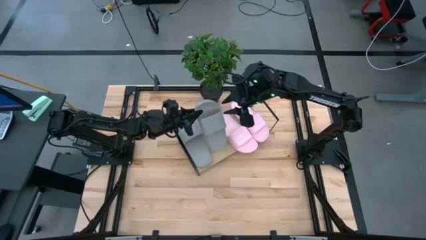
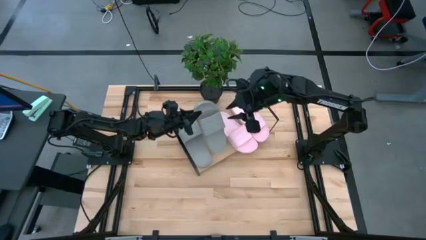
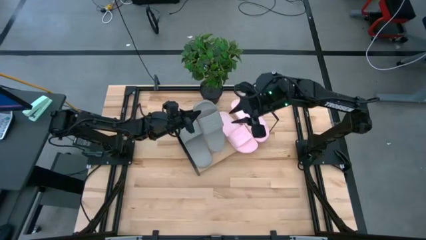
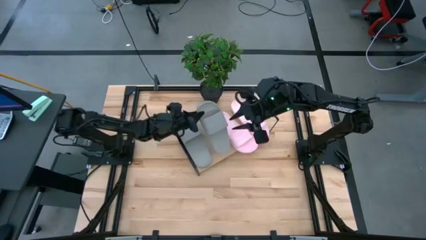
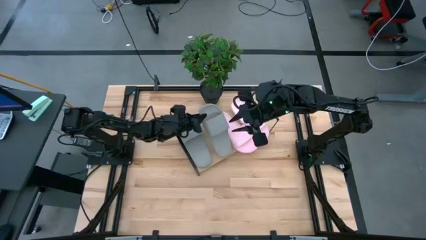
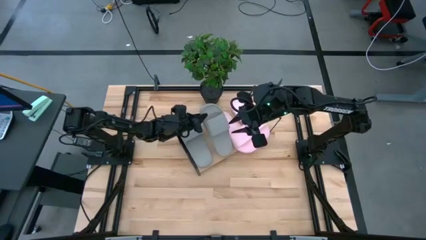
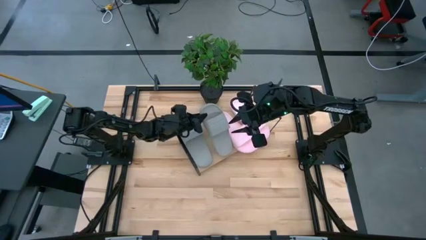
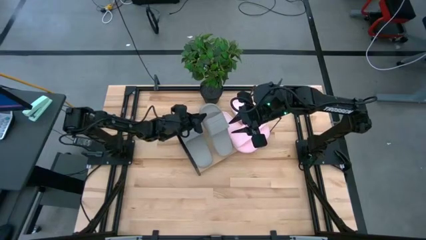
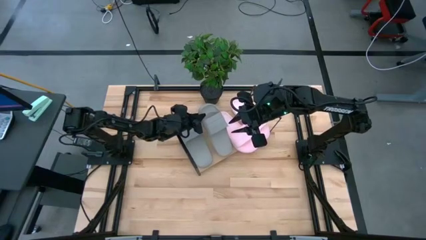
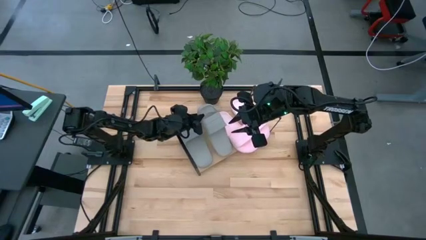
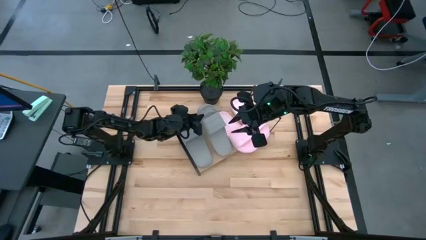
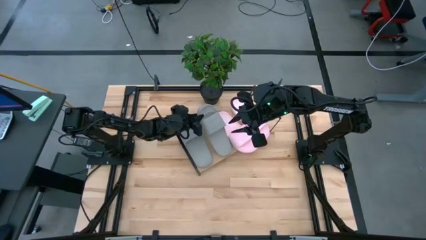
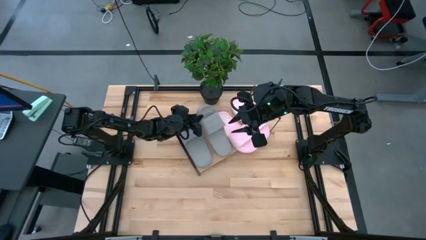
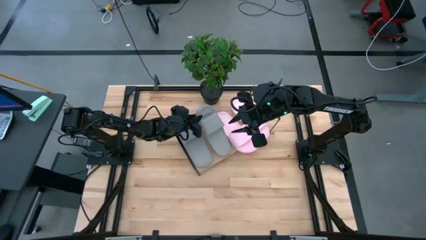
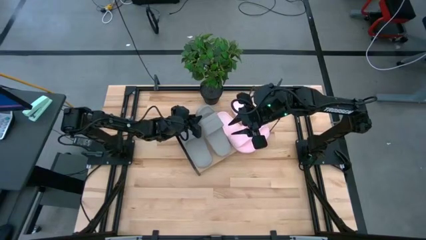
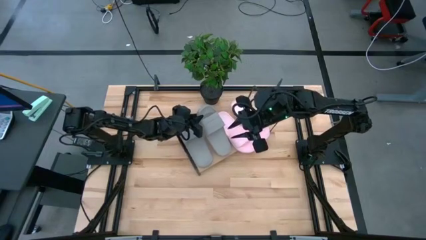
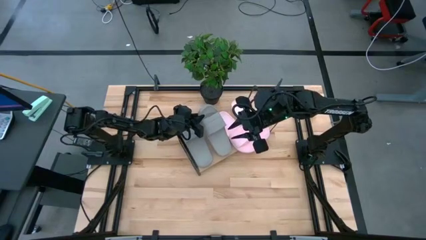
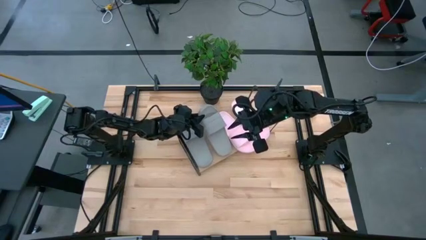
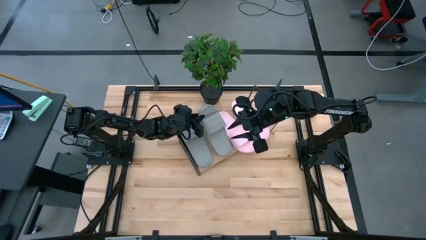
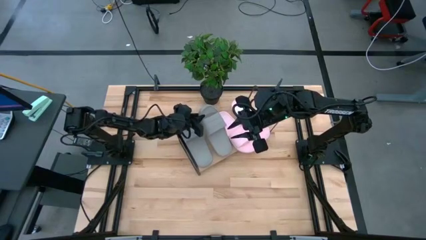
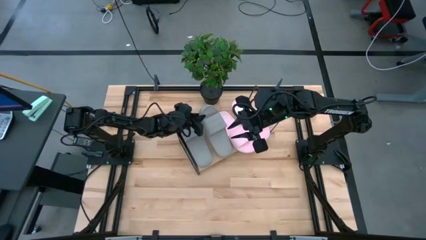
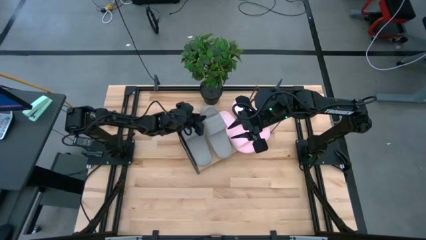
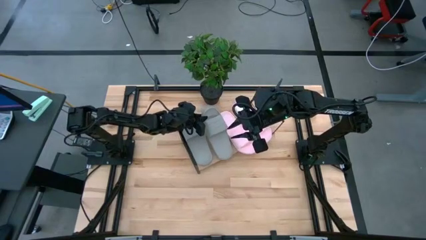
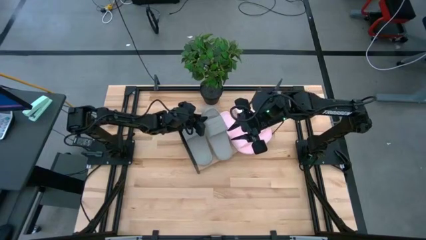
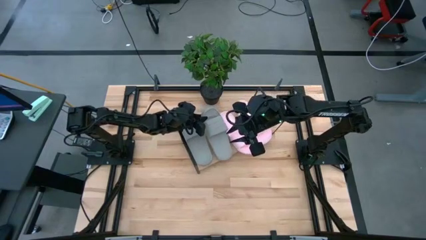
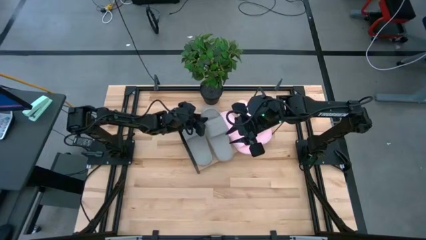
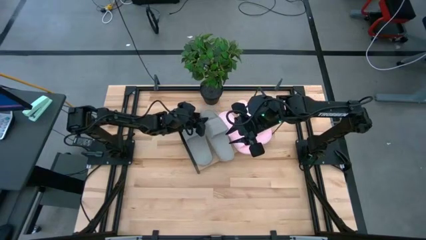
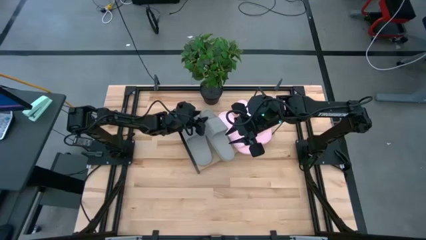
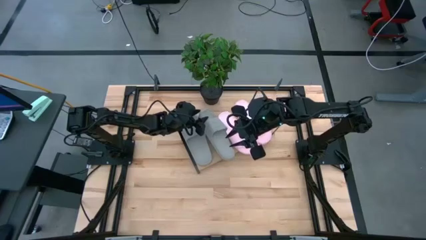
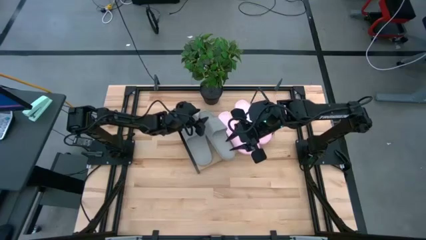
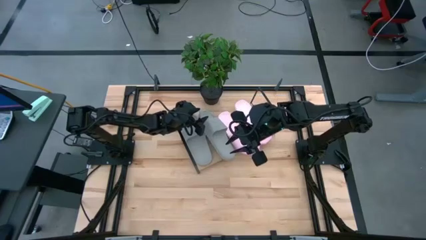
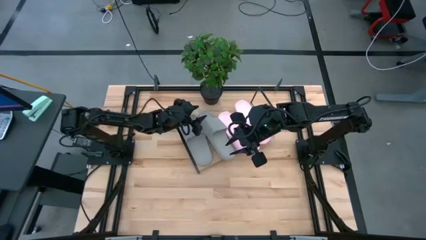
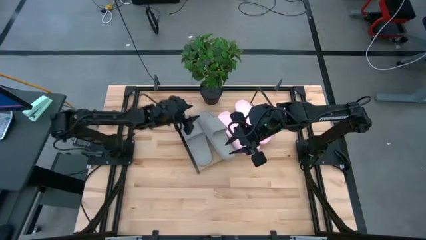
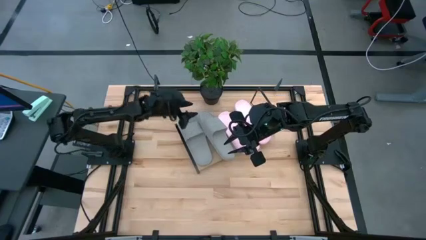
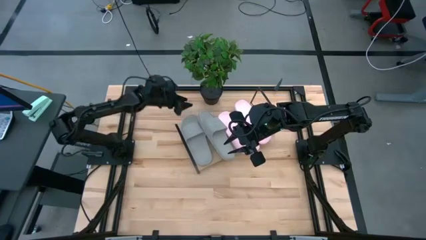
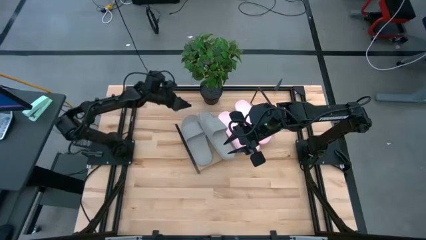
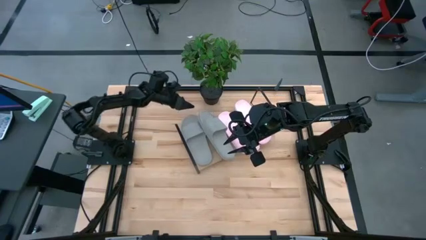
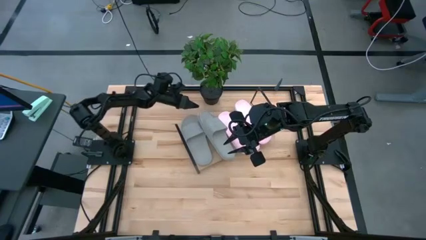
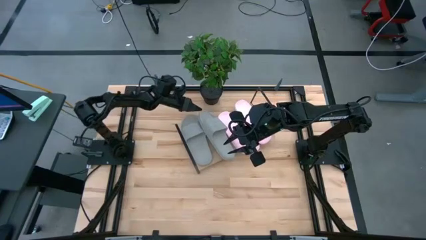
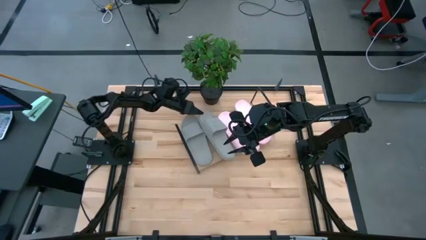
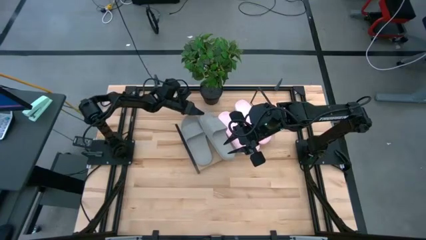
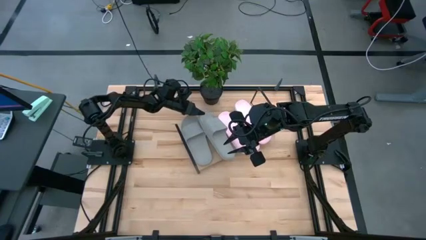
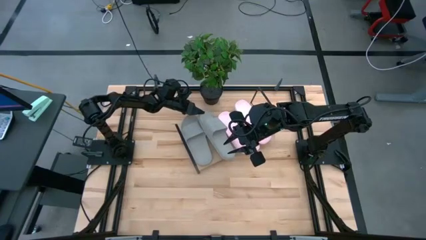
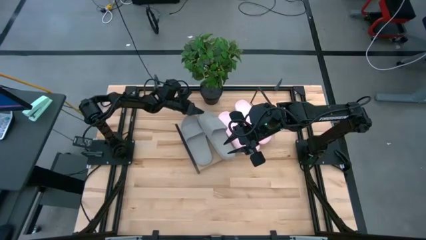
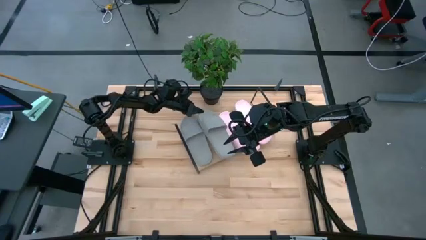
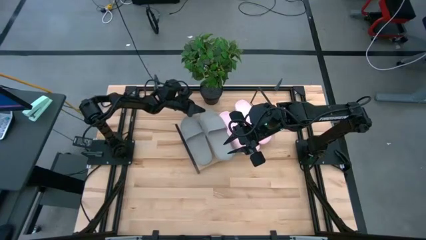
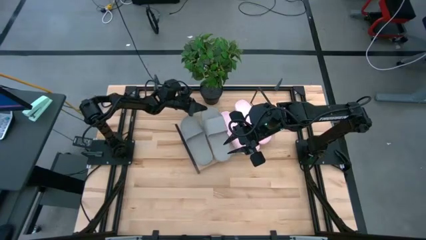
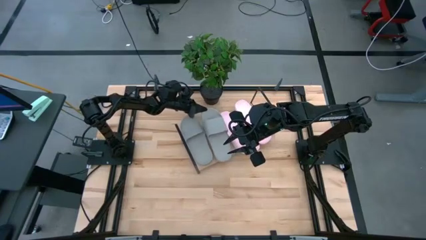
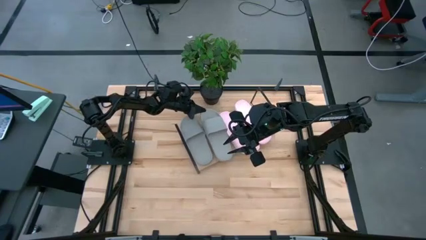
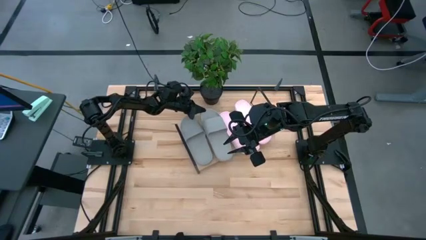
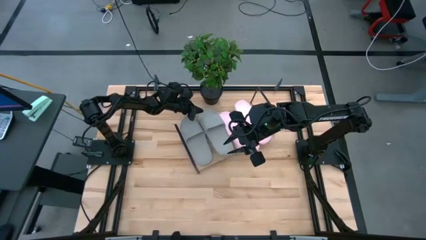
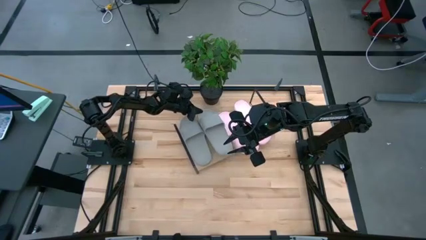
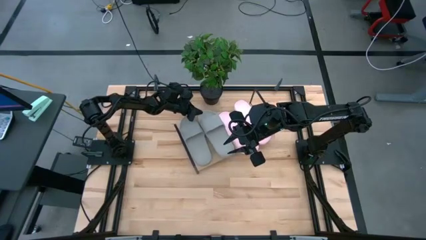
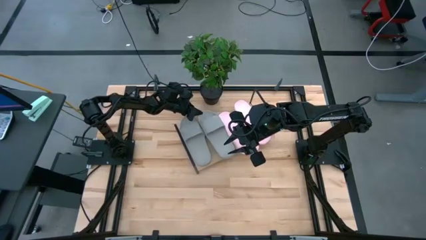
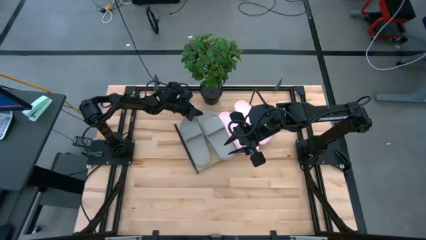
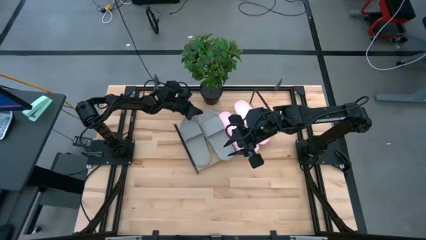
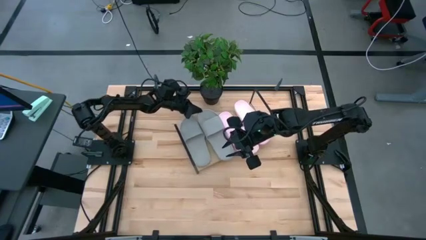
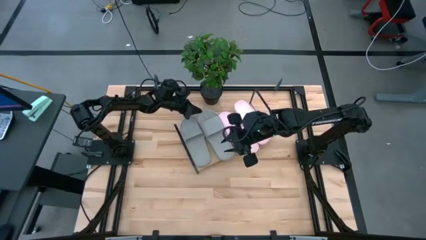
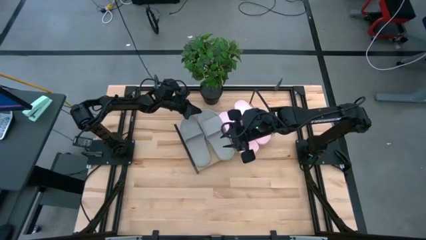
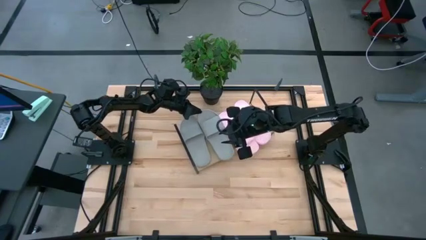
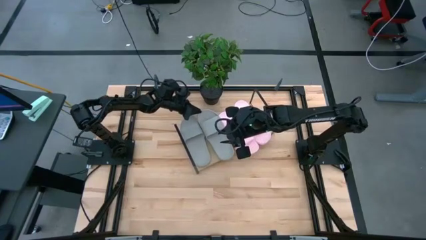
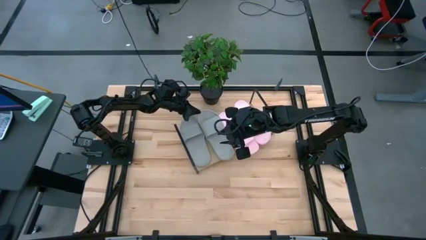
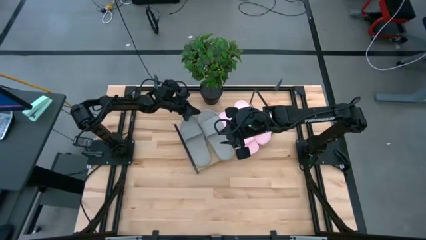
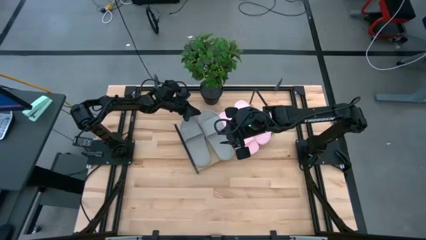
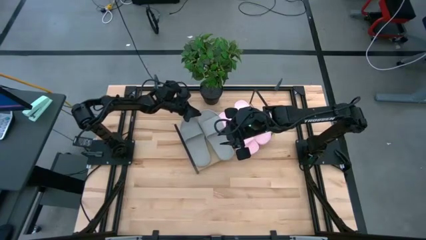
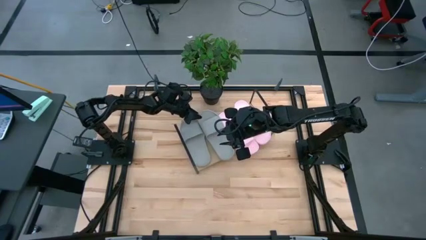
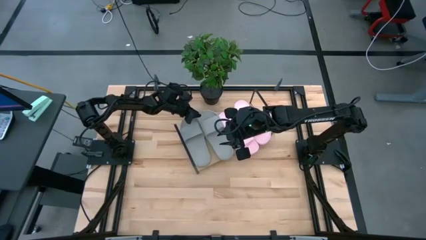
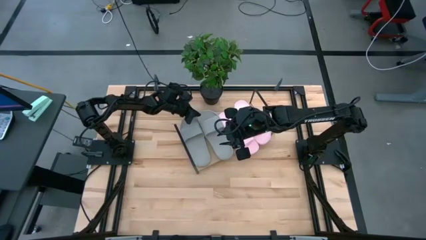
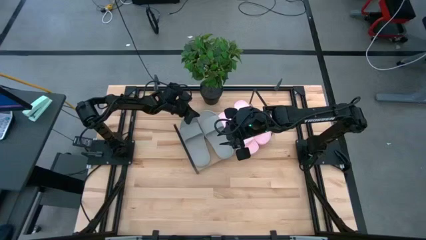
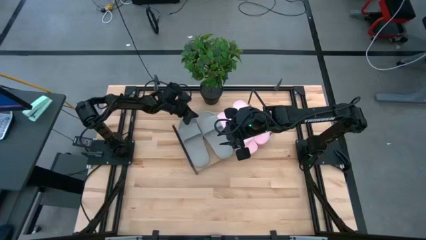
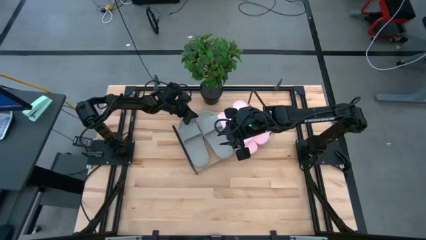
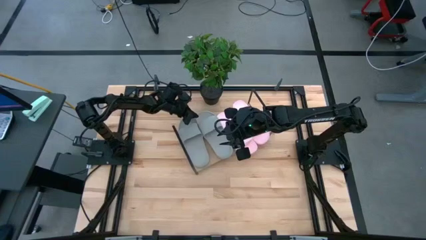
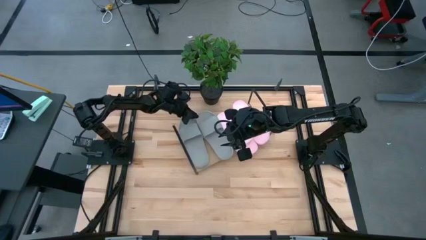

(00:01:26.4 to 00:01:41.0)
Task: Pick and place slides into the shelf
Put the gray slipper on the shelf

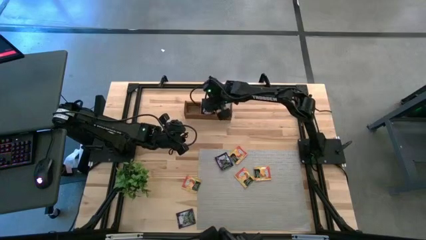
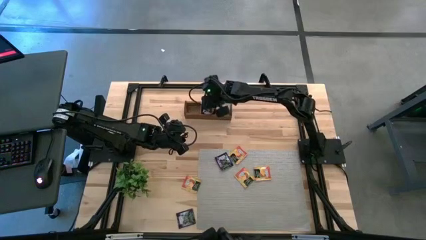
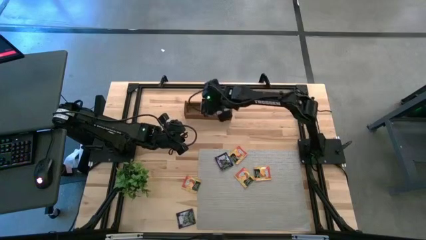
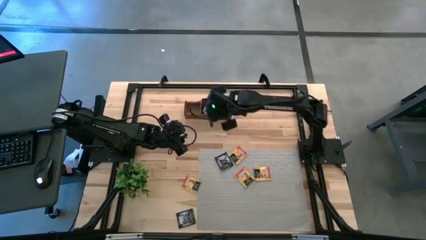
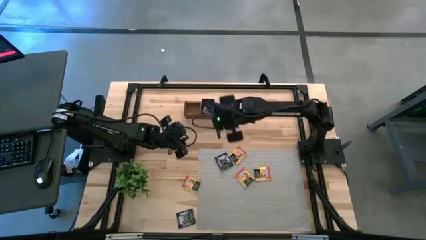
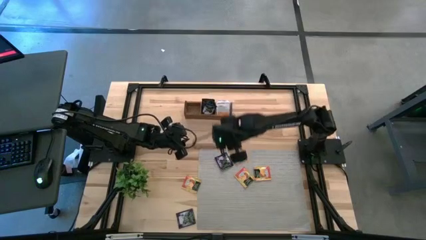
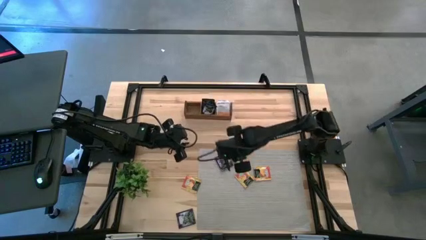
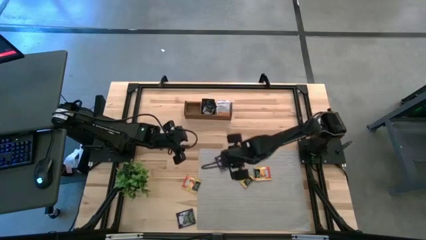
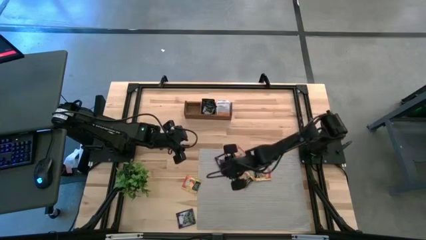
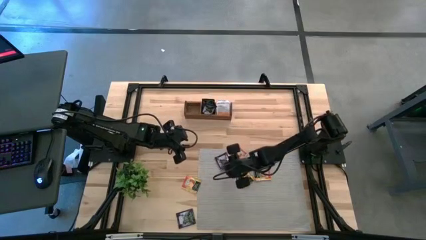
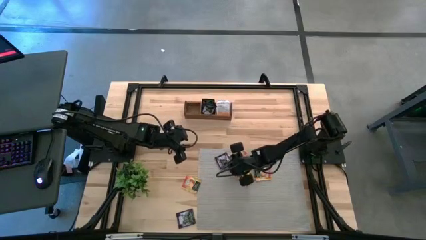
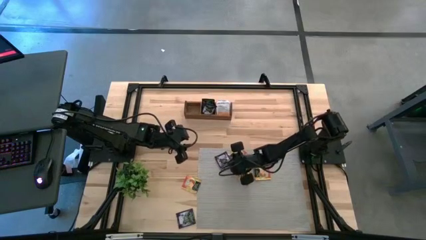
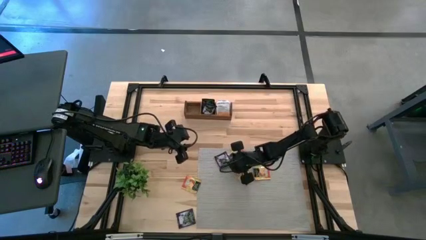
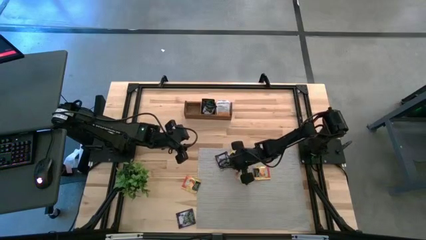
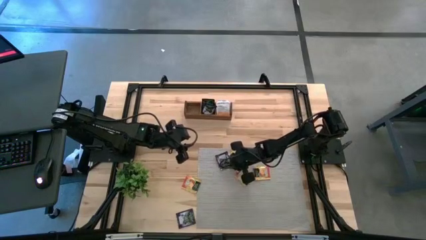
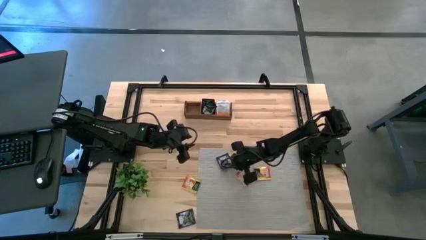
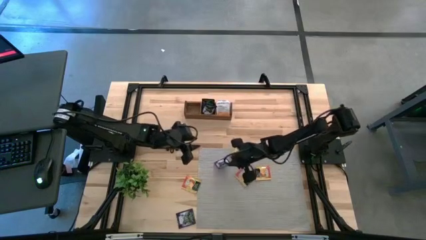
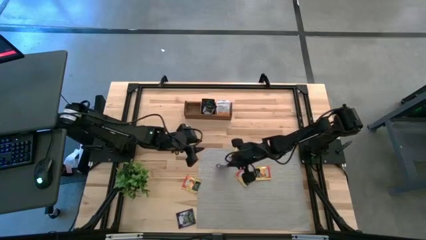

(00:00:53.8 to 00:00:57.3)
Task: Pick & Place Tea
Put the black tea bag into the middle section of the wooden organizer
